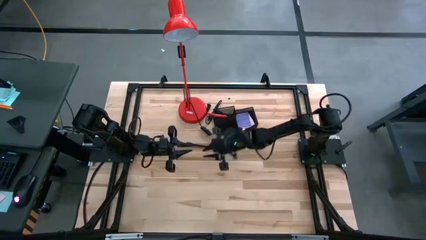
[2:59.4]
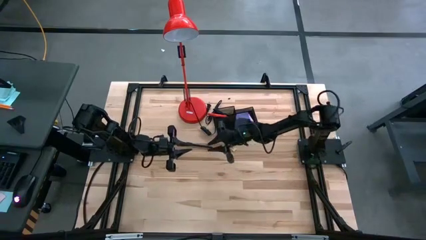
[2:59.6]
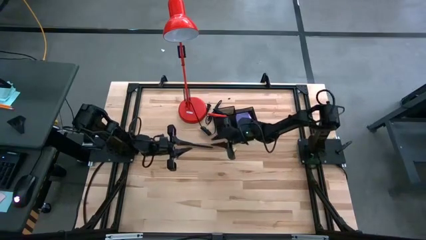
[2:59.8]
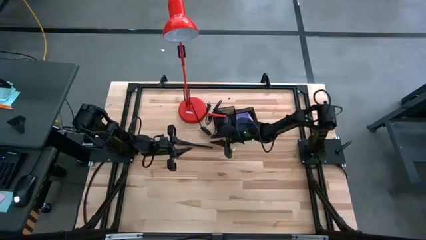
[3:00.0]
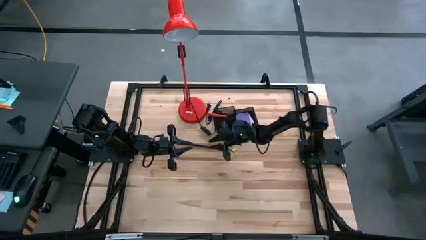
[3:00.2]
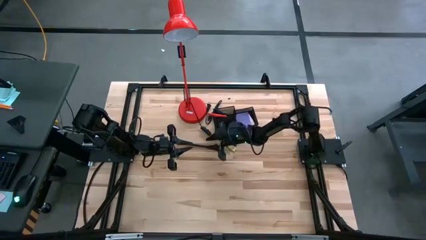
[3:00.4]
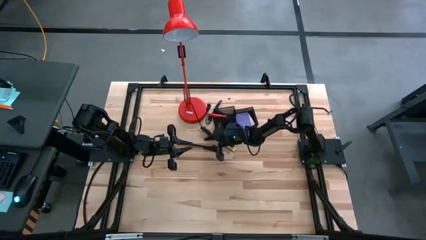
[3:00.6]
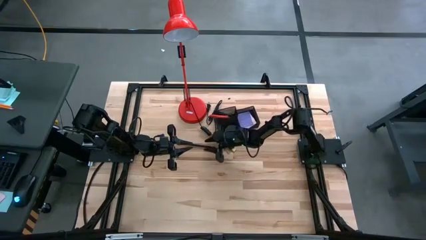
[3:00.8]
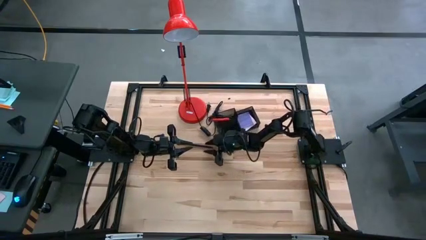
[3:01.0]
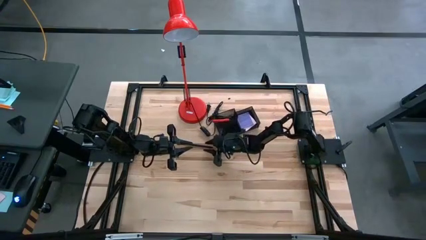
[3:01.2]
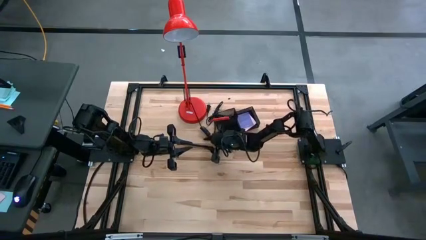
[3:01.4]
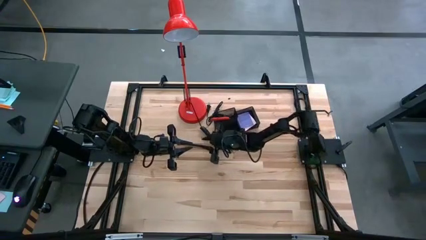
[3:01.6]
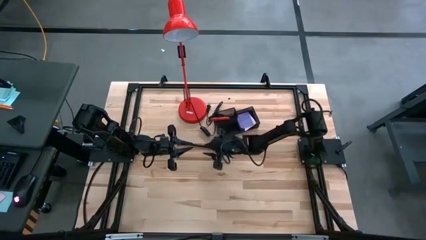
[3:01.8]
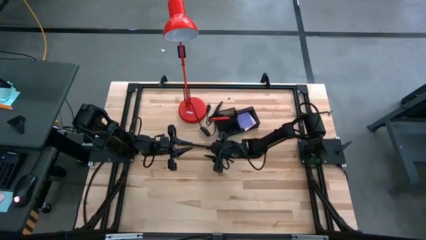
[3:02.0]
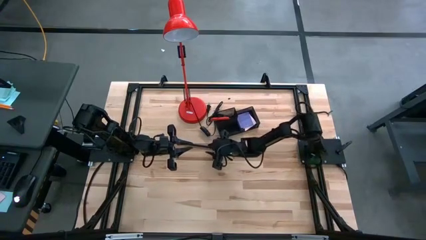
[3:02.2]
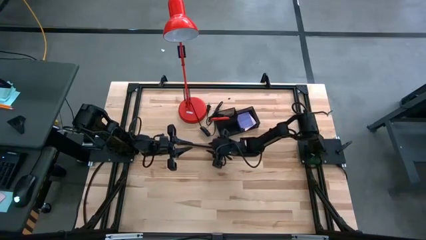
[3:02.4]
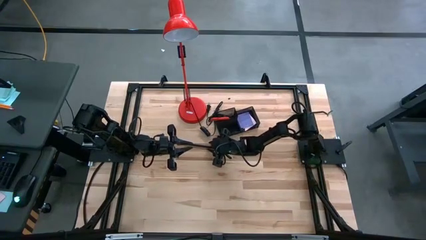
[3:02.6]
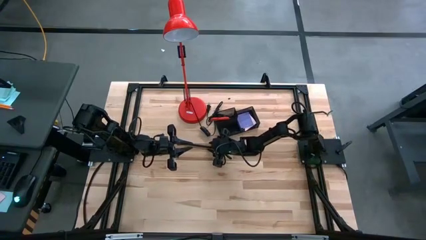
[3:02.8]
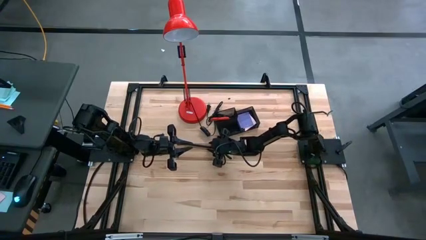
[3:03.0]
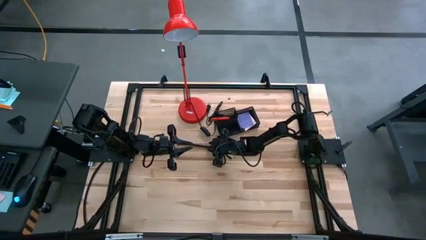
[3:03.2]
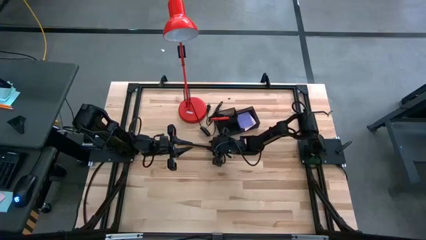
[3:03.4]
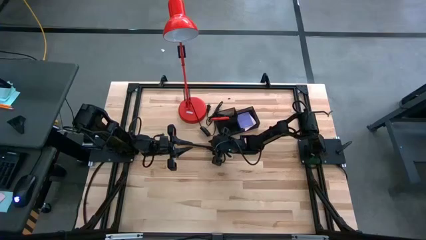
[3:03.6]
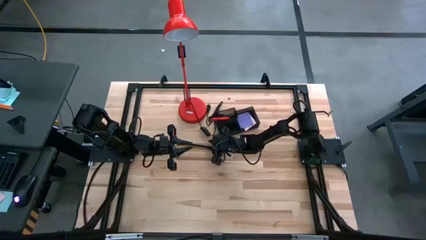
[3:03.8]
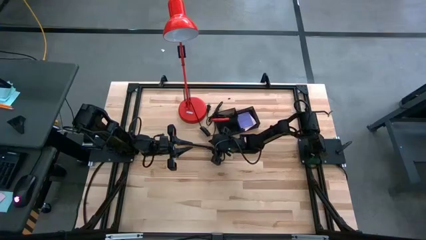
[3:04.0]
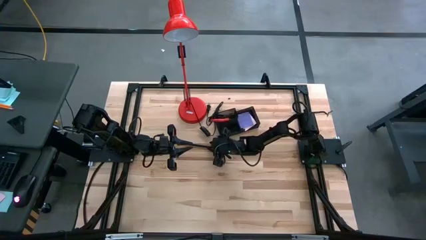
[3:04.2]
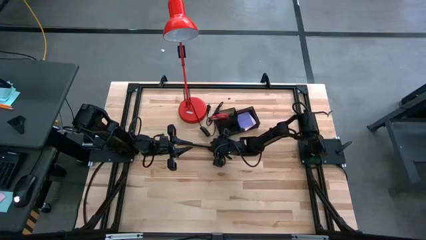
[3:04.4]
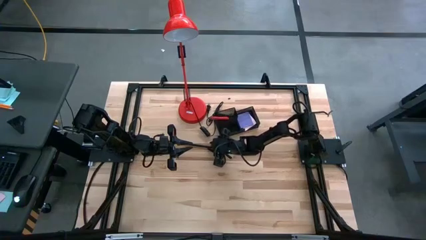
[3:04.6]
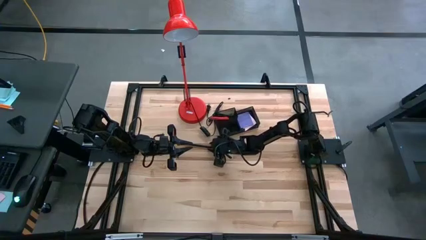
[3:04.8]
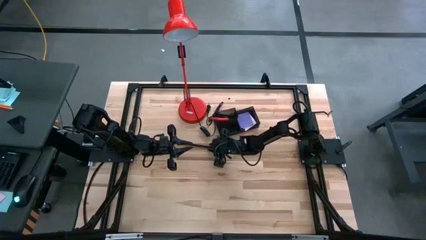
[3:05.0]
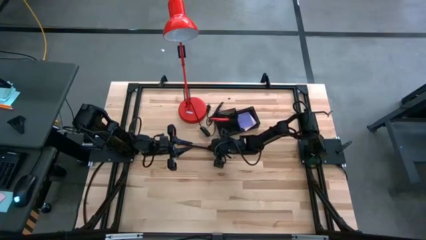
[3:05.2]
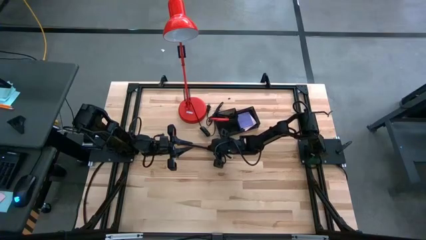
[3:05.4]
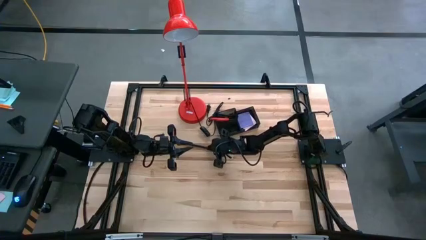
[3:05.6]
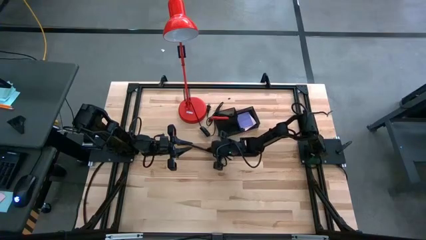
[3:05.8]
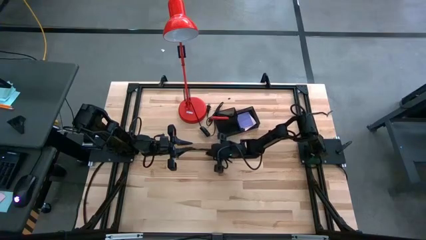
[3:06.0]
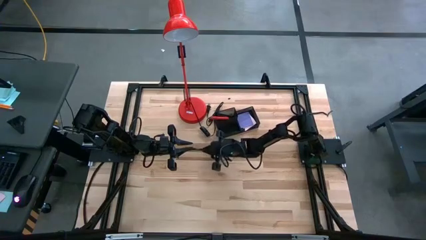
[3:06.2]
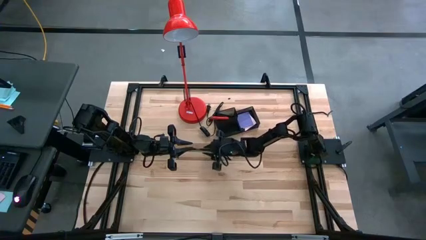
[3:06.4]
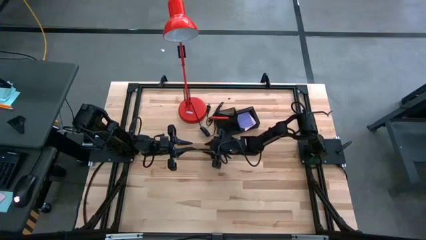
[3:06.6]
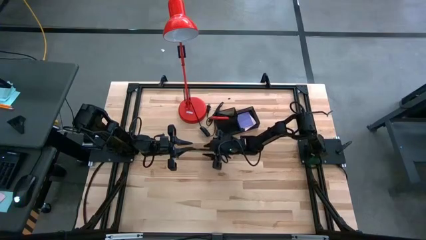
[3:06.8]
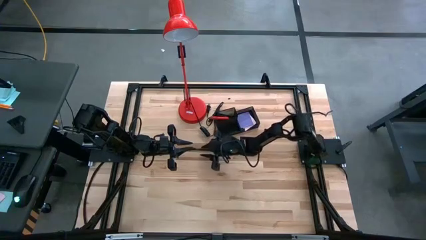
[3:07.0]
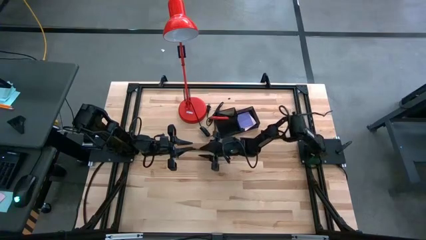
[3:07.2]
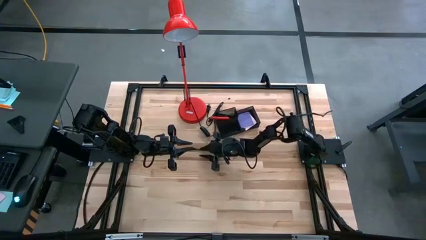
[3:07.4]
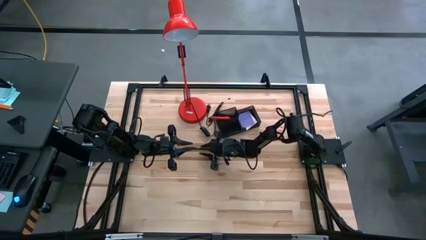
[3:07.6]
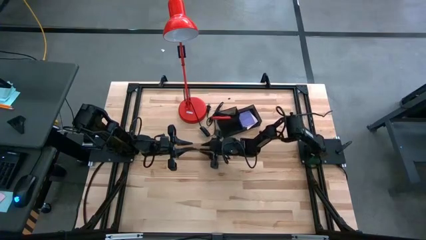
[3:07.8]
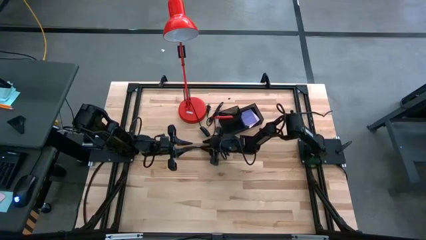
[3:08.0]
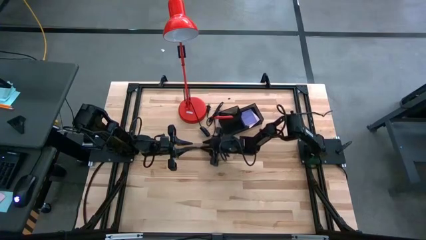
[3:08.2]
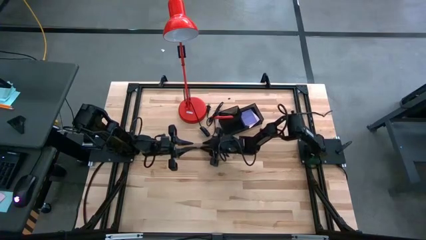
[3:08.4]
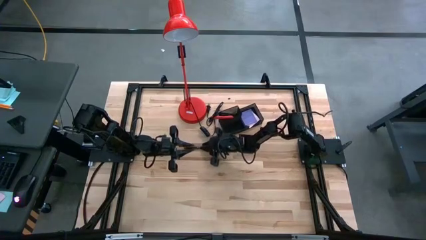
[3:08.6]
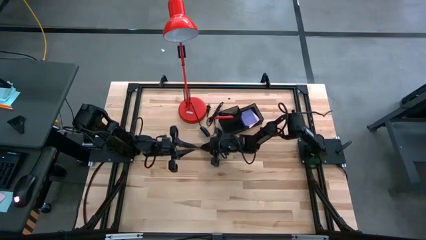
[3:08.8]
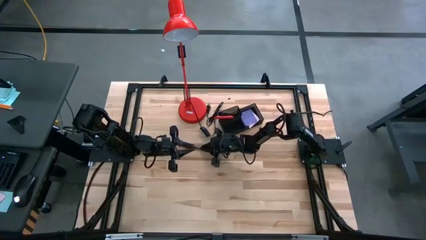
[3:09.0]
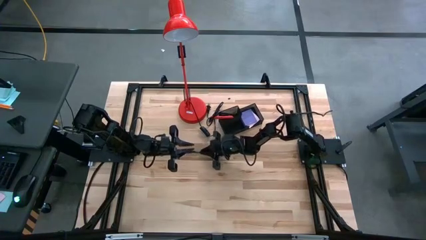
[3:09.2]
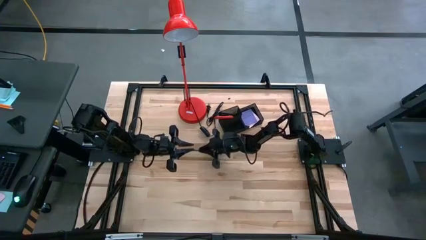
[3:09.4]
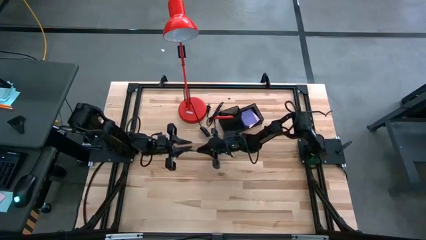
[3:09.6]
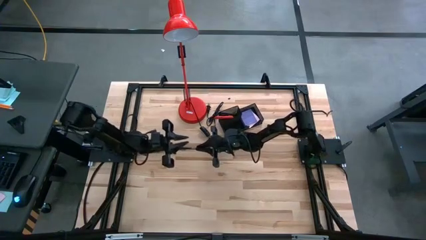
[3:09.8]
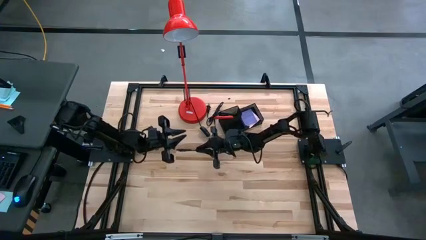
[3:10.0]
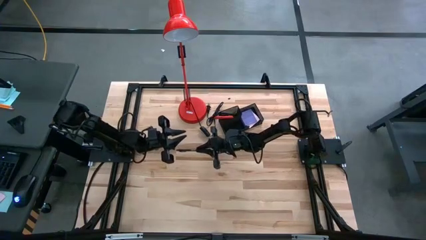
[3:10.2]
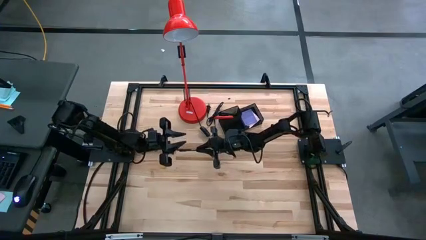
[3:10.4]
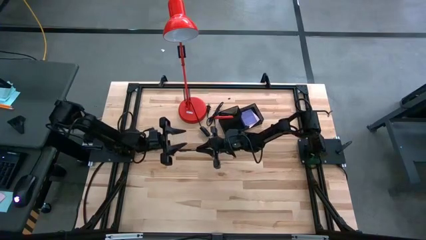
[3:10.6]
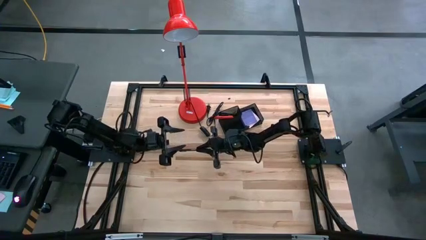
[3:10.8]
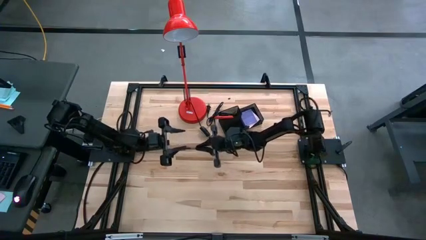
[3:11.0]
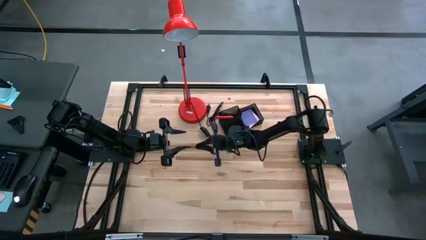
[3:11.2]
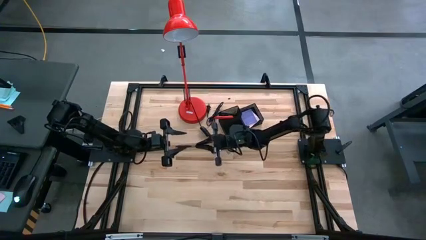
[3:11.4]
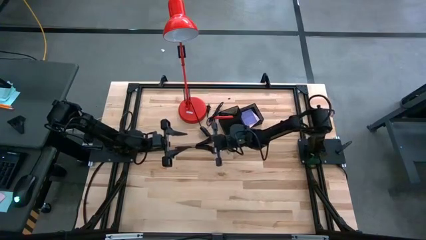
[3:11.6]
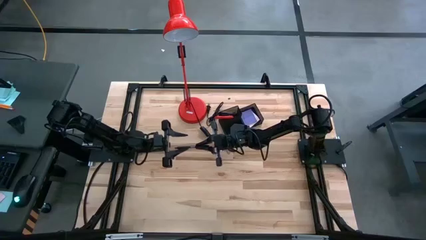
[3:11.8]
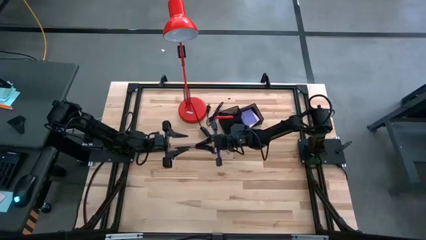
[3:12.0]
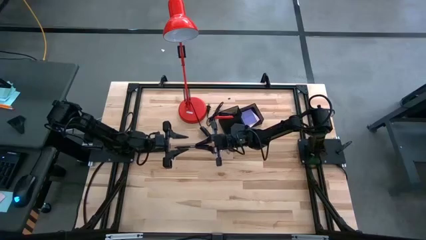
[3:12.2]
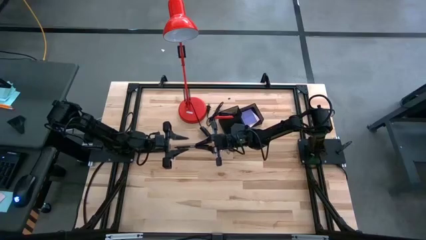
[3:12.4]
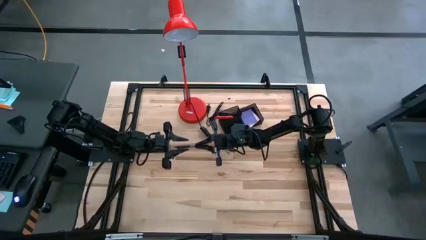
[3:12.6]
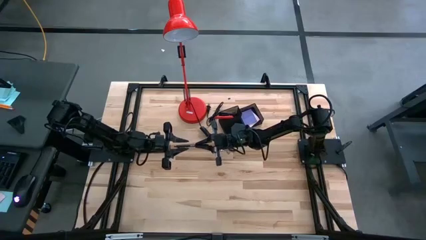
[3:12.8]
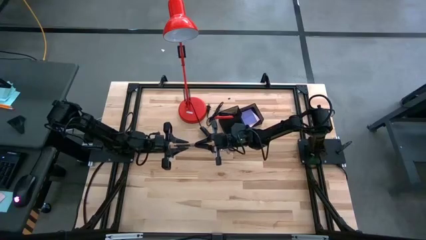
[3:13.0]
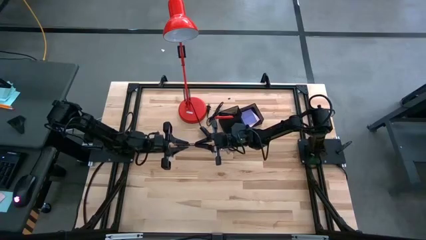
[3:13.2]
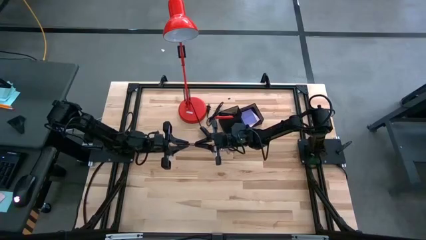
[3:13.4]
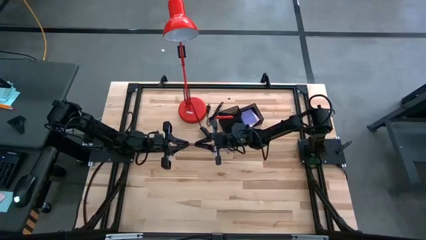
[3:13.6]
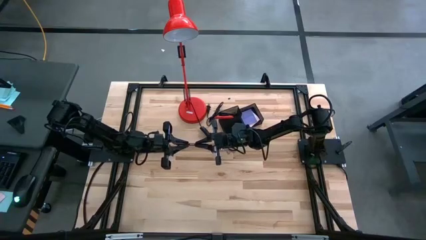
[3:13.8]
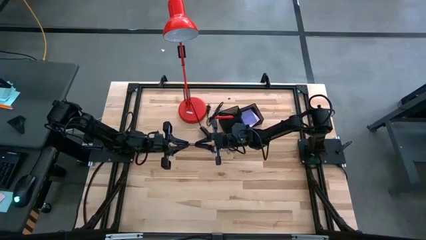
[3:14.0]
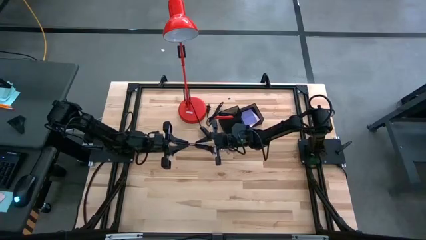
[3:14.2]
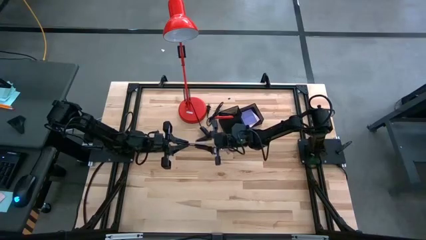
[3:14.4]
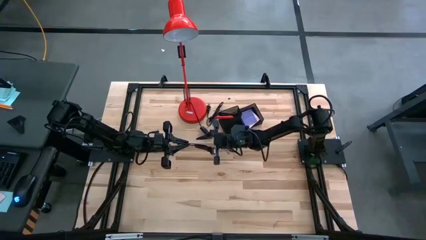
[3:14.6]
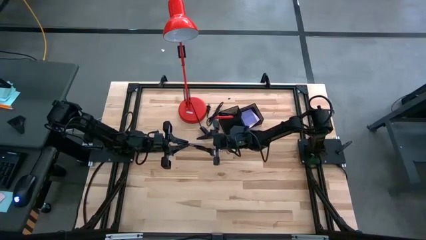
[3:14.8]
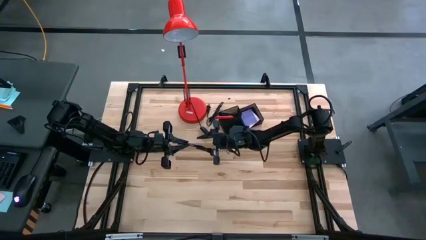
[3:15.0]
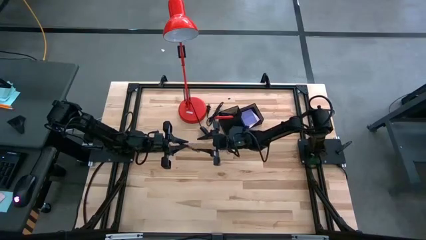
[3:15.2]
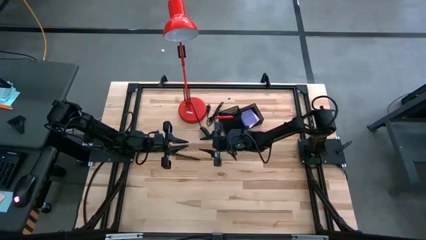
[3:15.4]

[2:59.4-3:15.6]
Task: Pick and place office supplies into organizer
Put the black pen into the black desk organizer
